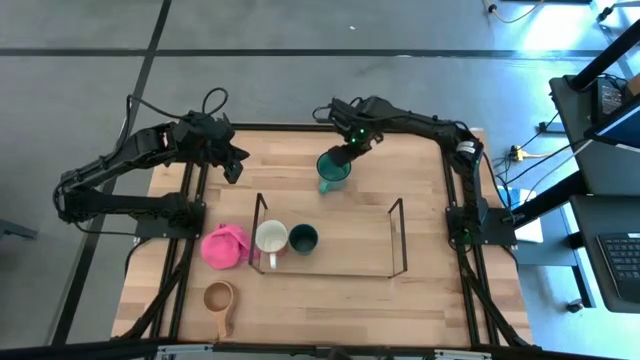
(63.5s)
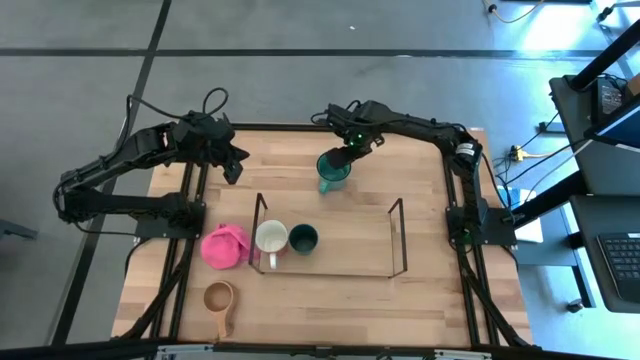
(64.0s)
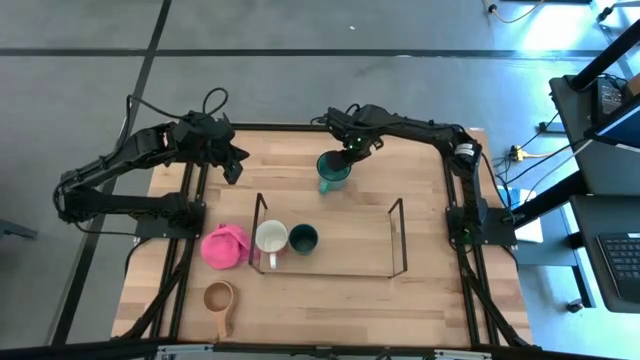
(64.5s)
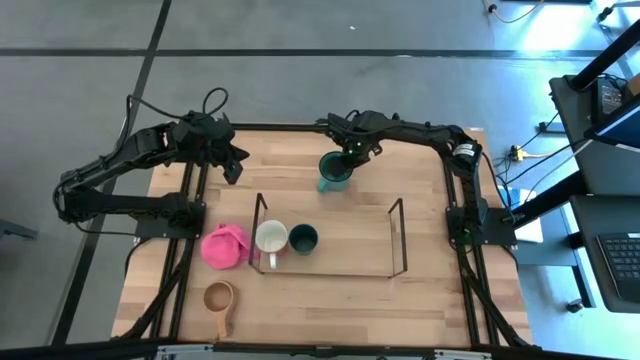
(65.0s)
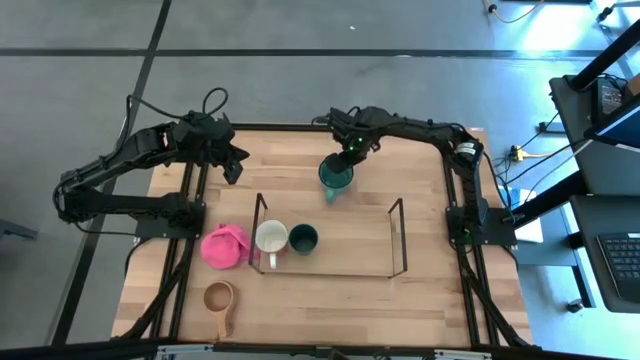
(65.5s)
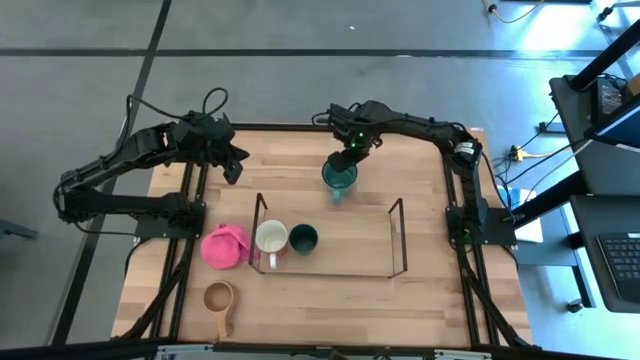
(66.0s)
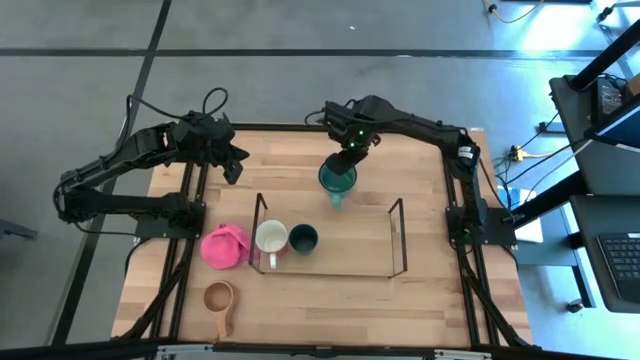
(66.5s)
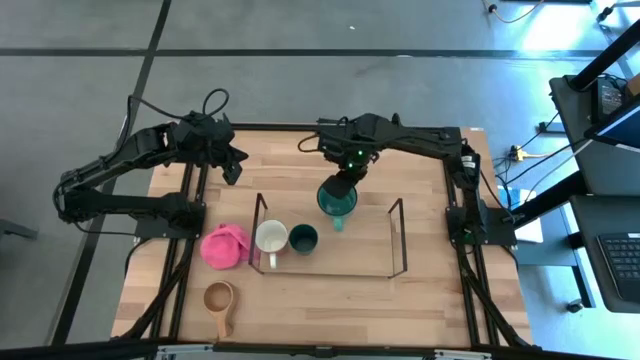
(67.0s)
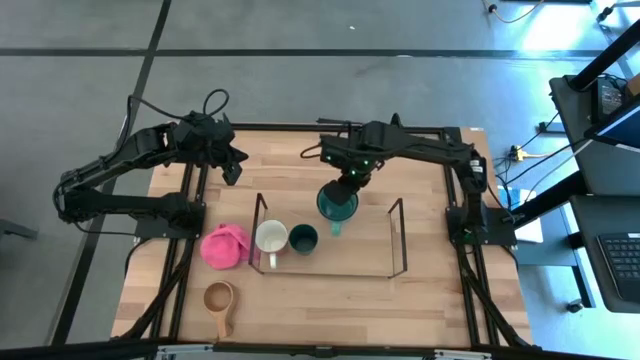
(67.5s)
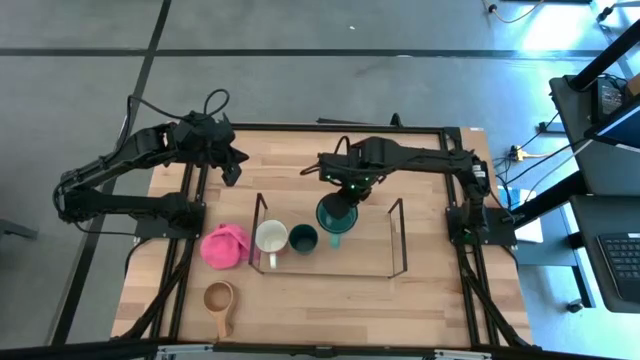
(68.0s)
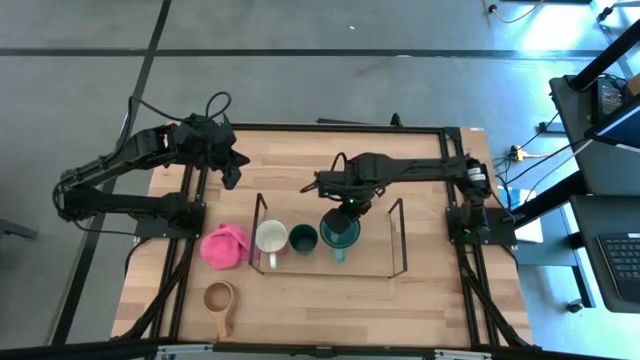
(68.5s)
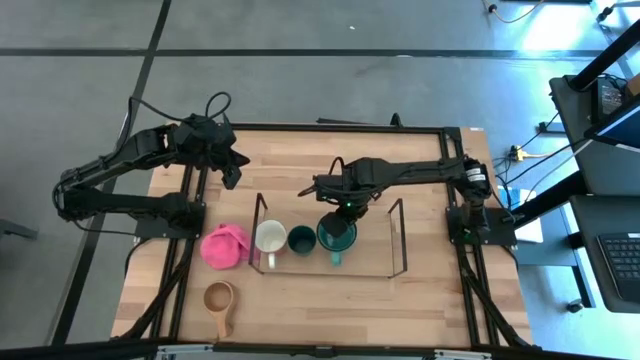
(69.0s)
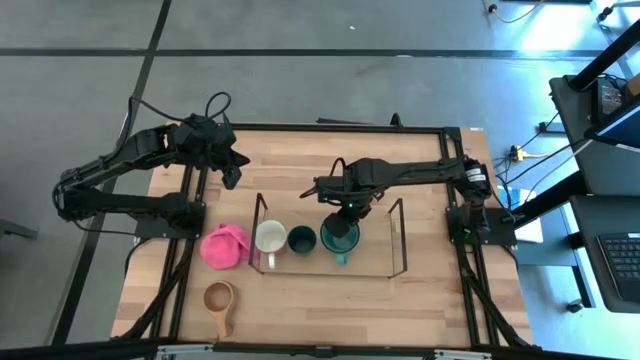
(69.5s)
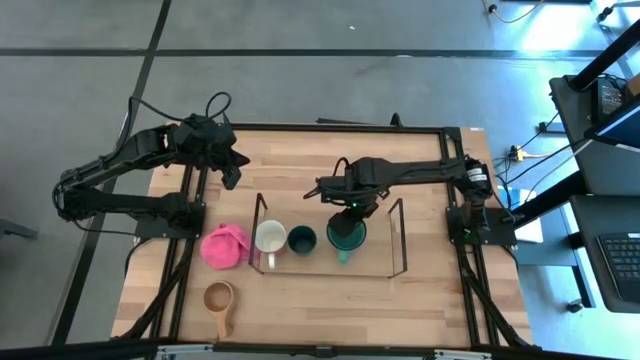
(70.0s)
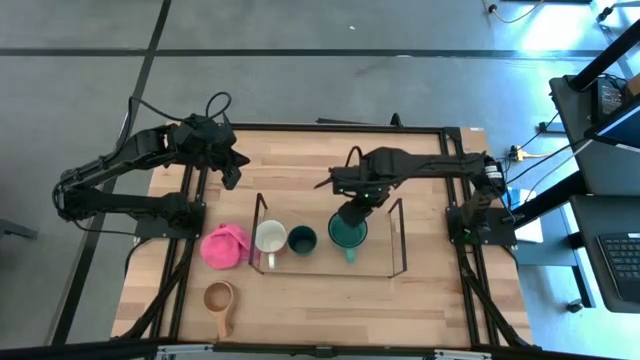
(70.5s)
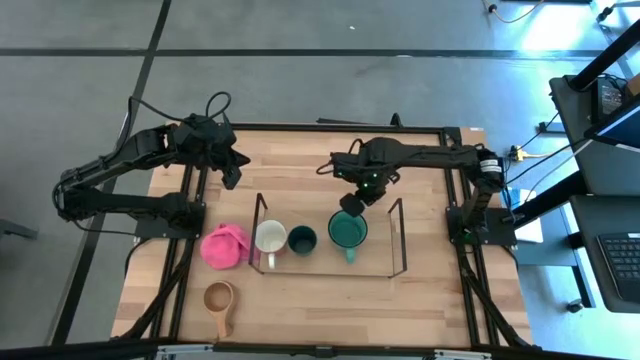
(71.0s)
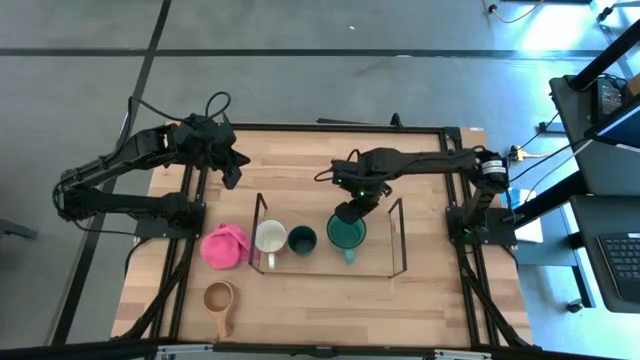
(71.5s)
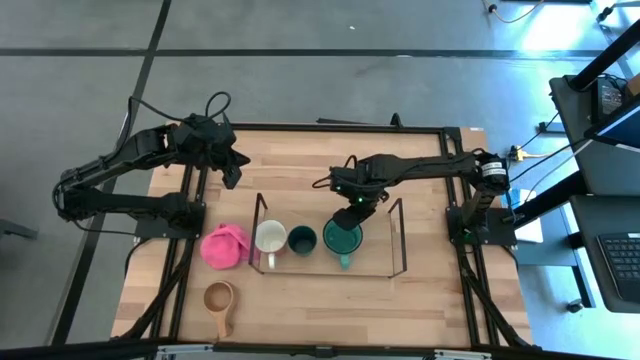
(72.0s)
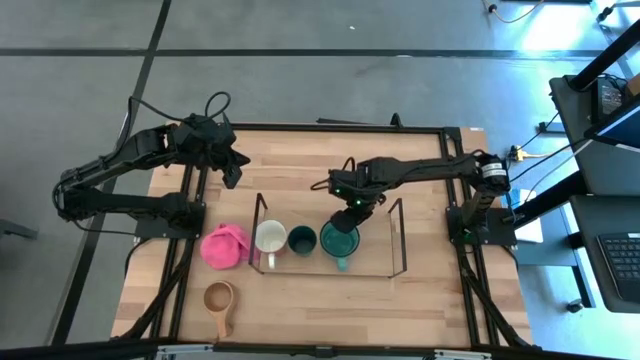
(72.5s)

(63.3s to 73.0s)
Task: Stack small to large cups/mugs on shelf
Put the blue mug on the shelf

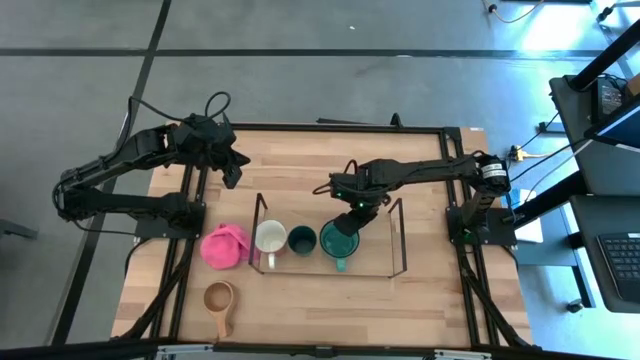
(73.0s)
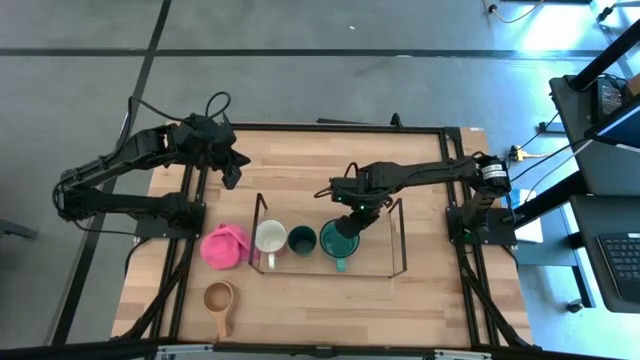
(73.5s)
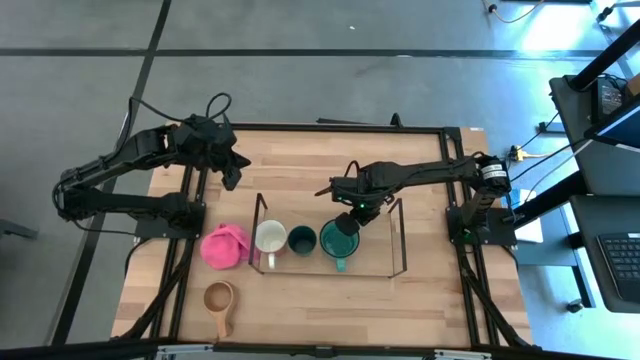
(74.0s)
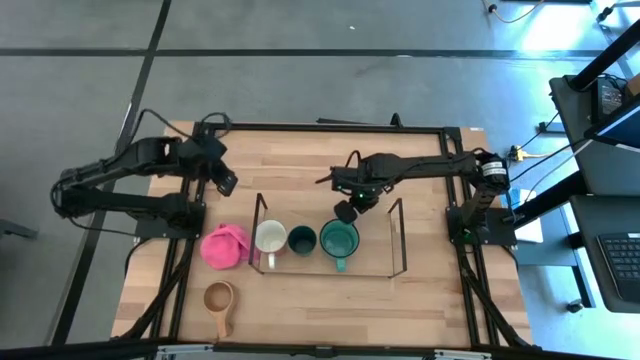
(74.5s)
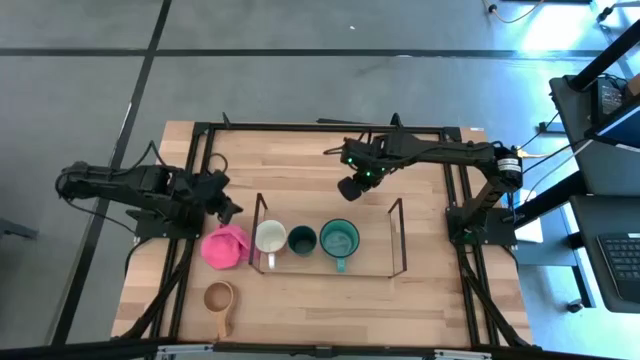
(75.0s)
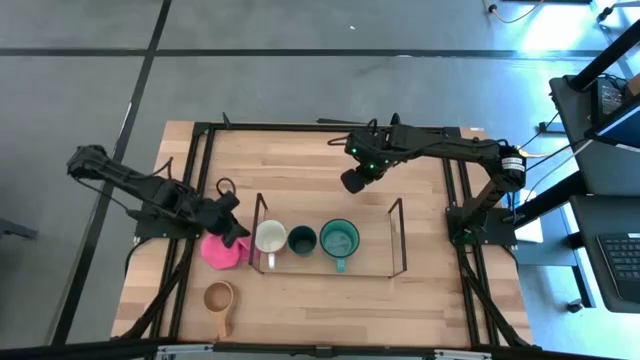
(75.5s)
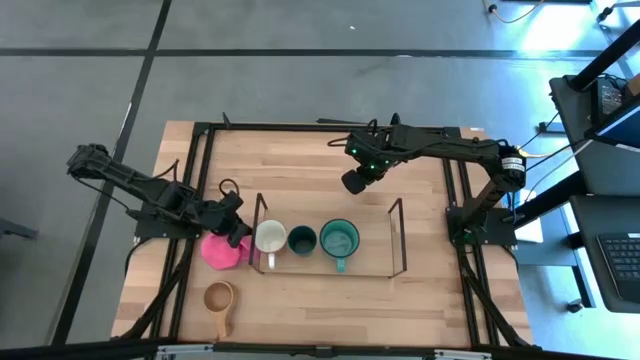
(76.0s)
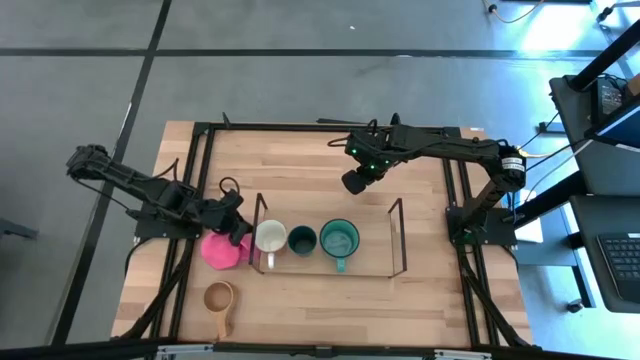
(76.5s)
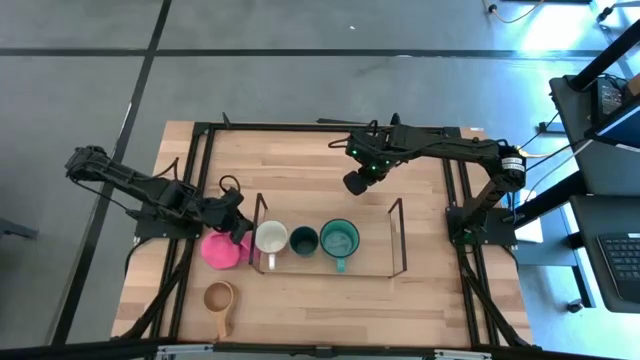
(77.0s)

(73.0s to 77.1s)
Adjust the orange mug on the shelf

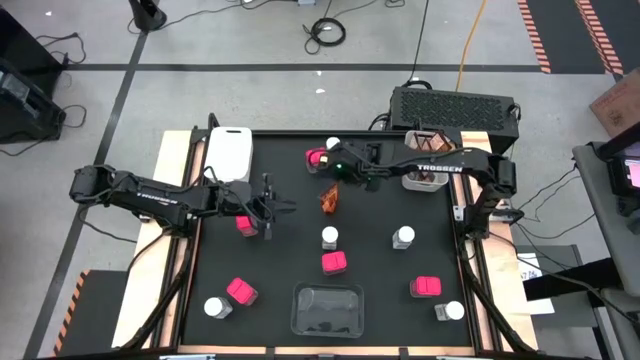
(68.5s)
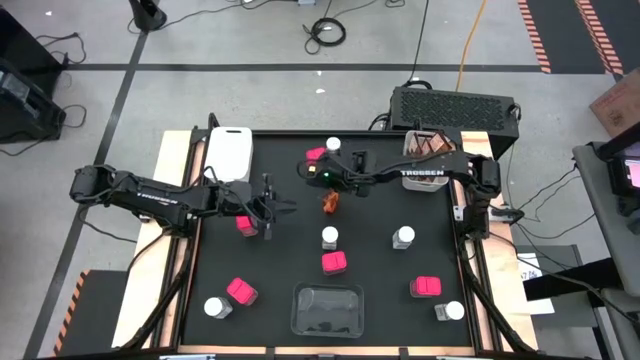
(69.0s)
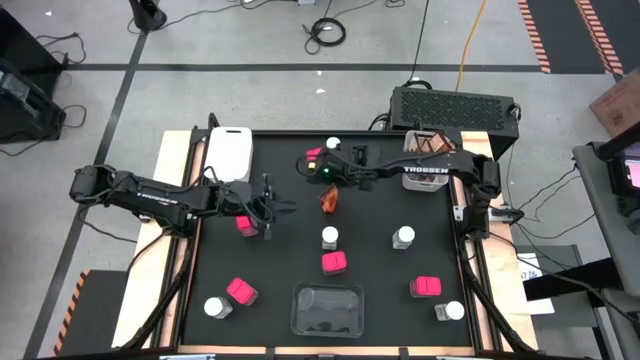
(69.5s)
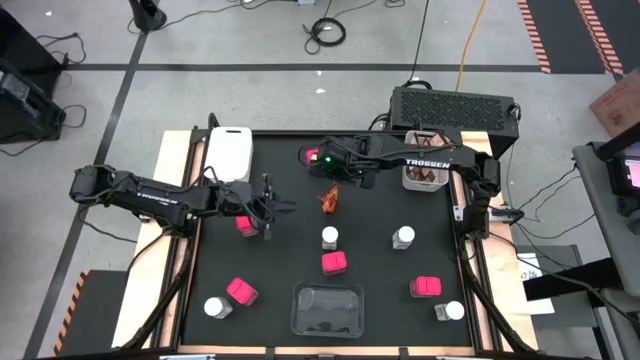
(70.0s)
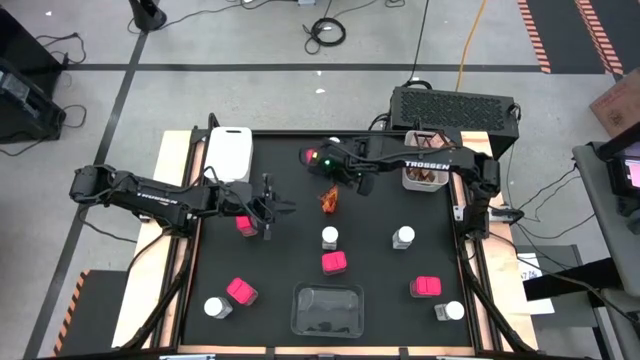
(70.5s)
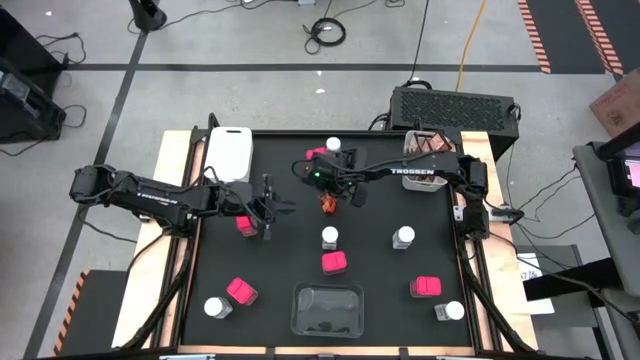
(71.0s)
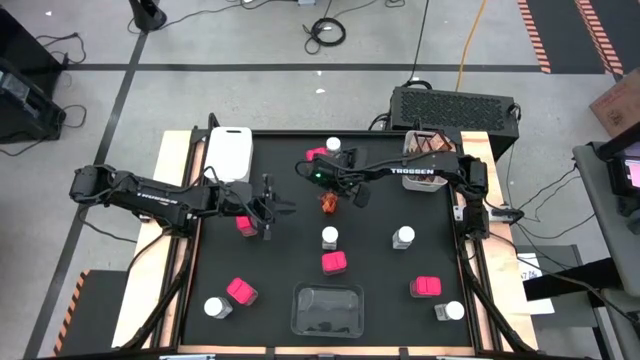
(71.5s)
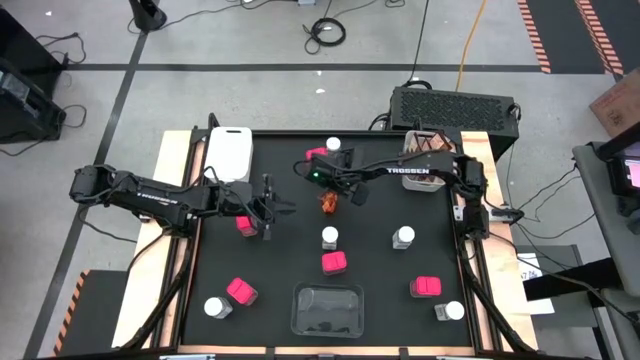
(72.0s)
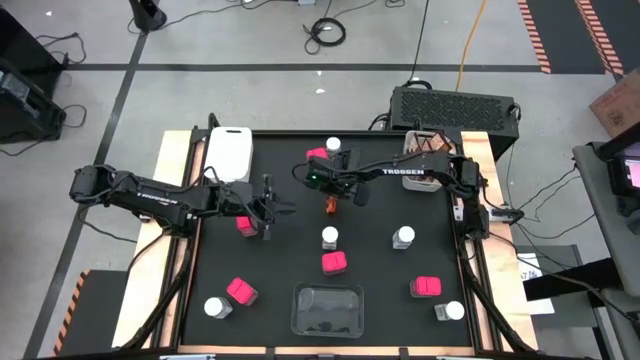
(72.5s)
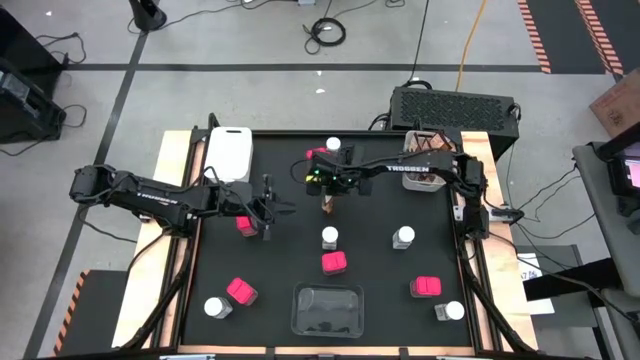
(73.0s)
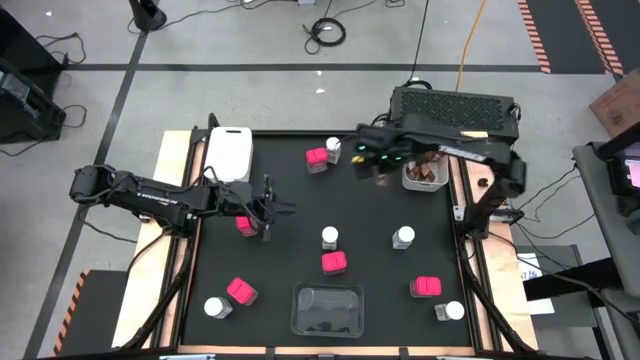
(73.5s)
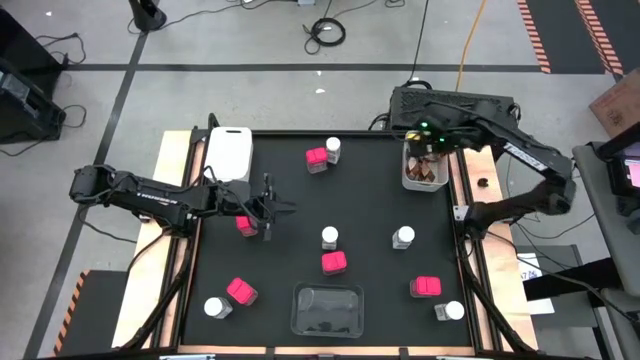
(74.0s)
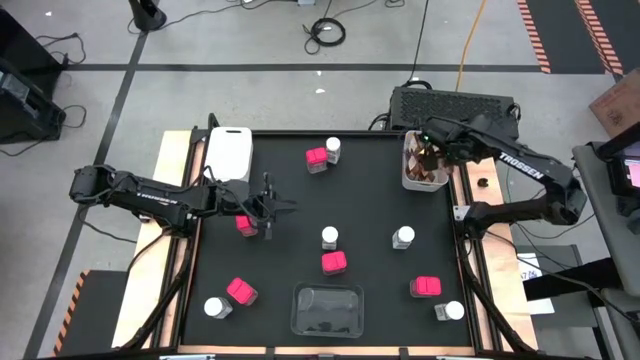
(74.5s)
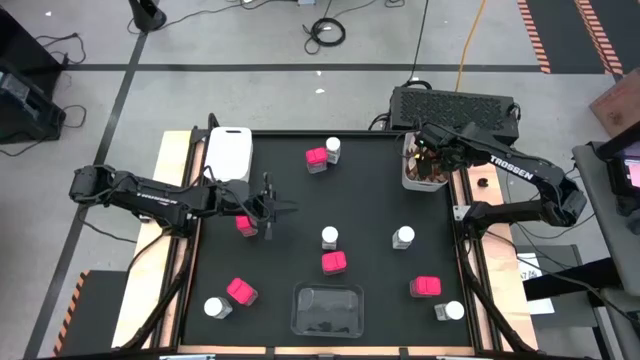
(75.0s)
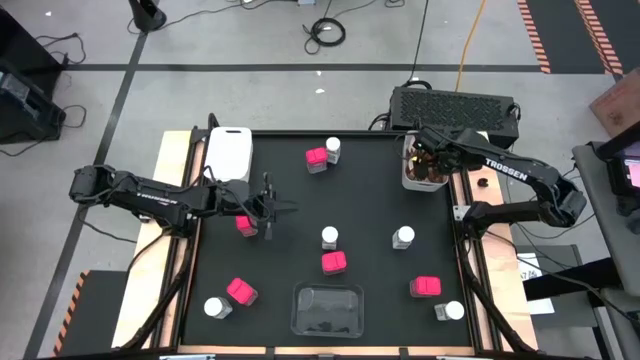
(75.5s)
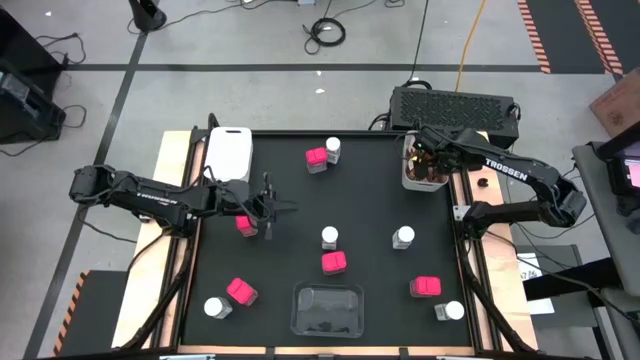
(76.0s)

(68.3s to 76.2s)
Task: Sort spices by type
Put the brown seasoning pack into the right white bin
